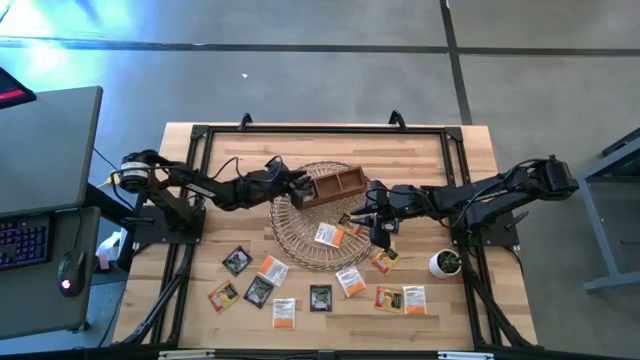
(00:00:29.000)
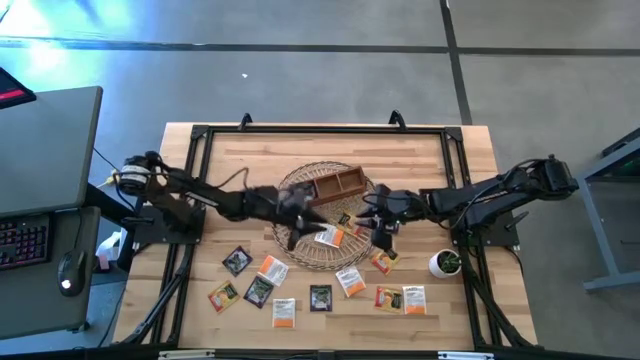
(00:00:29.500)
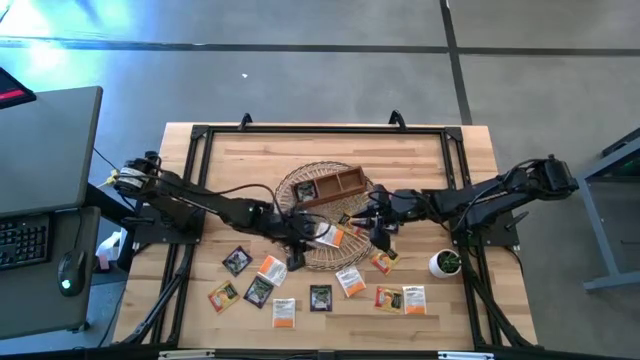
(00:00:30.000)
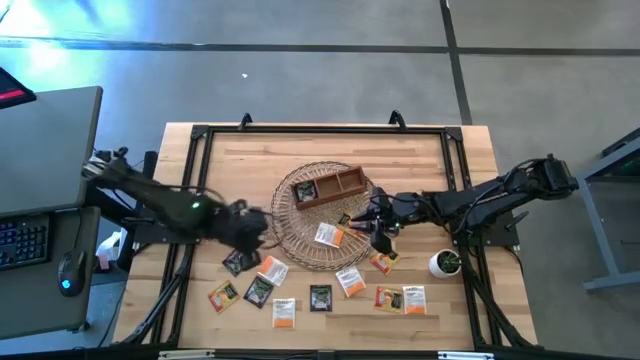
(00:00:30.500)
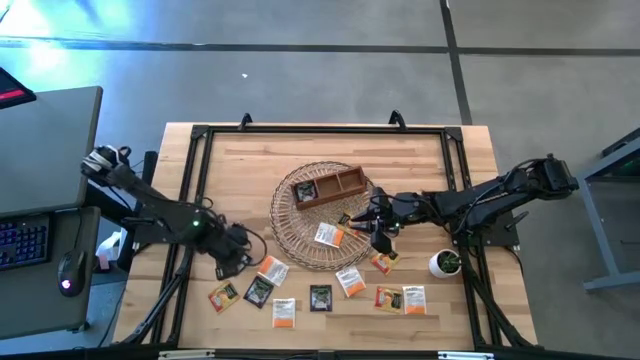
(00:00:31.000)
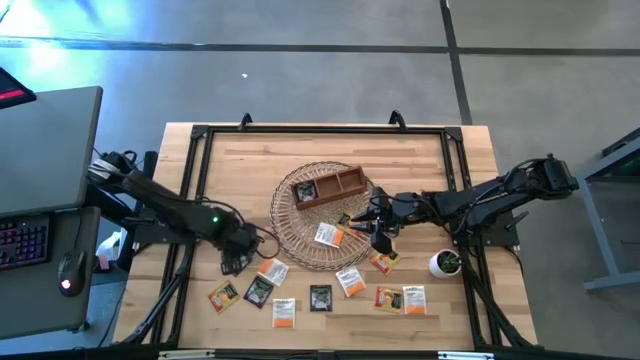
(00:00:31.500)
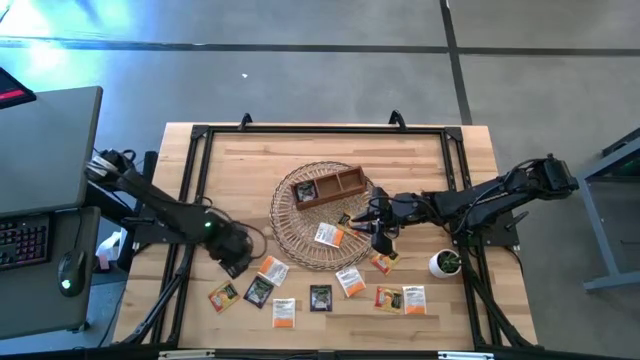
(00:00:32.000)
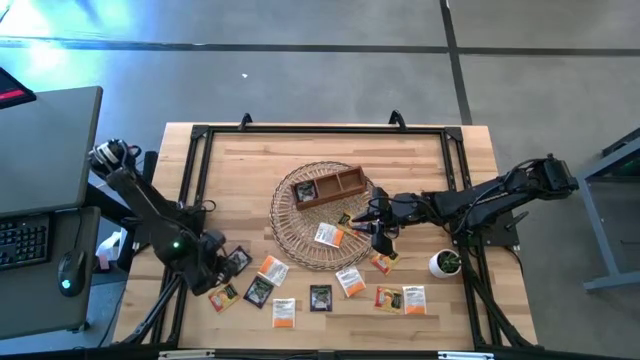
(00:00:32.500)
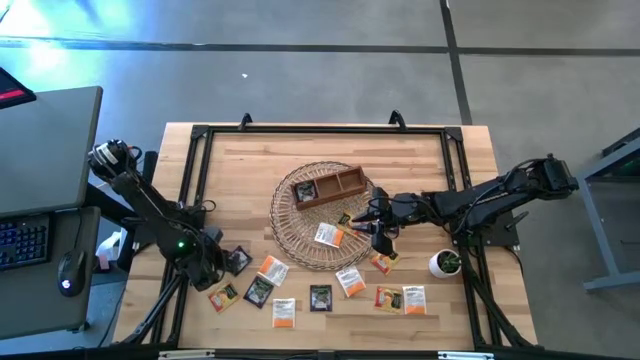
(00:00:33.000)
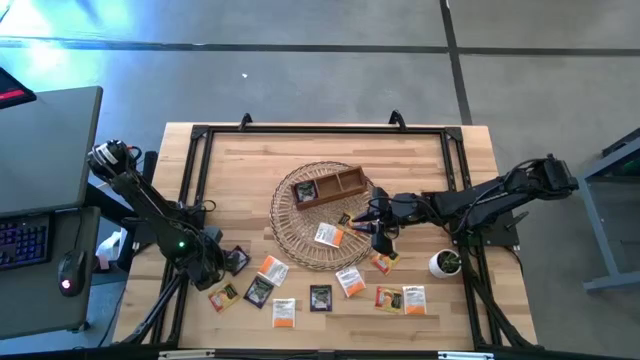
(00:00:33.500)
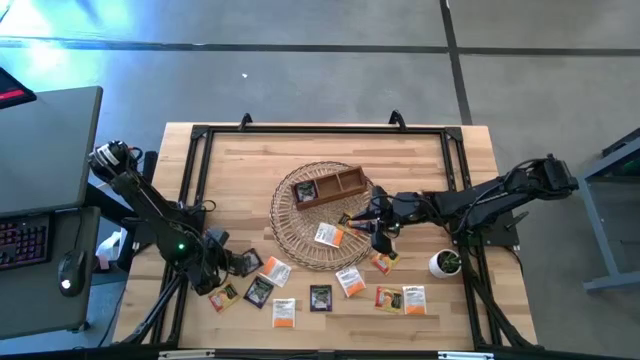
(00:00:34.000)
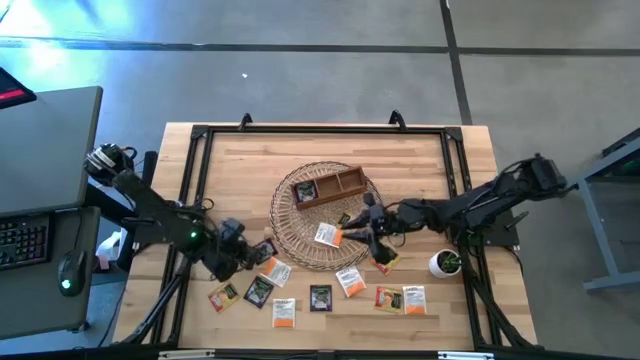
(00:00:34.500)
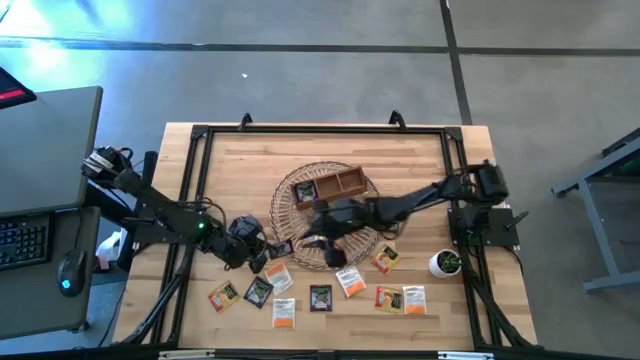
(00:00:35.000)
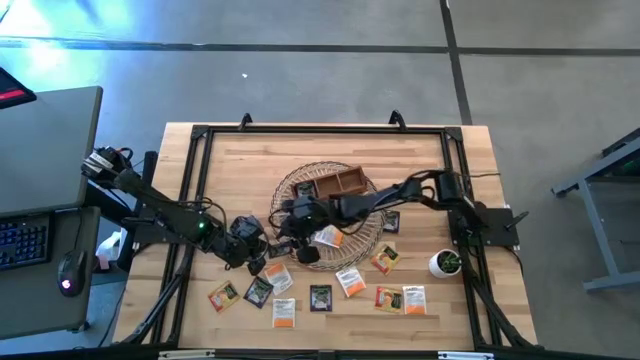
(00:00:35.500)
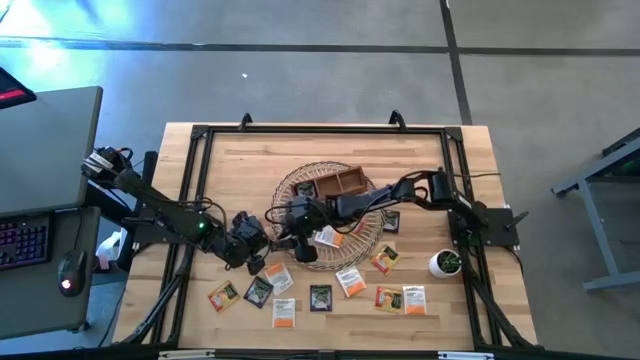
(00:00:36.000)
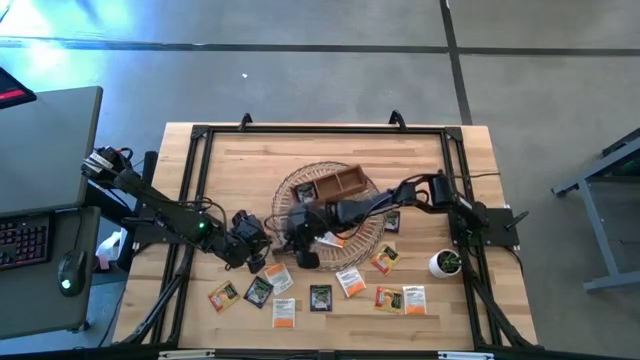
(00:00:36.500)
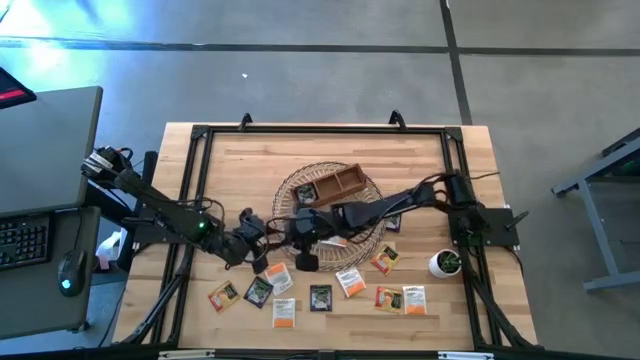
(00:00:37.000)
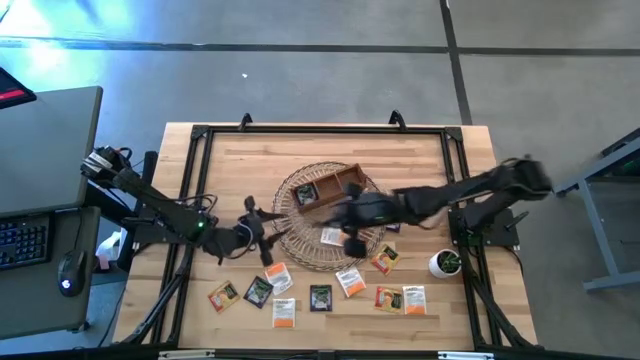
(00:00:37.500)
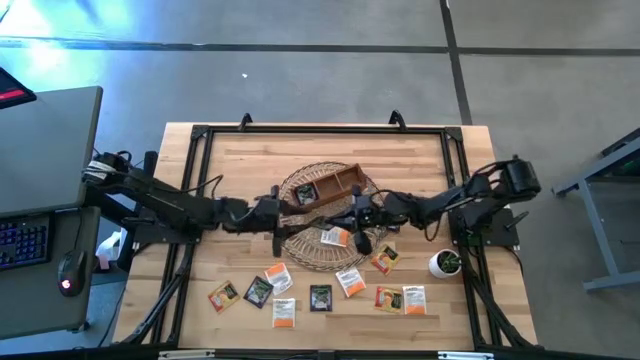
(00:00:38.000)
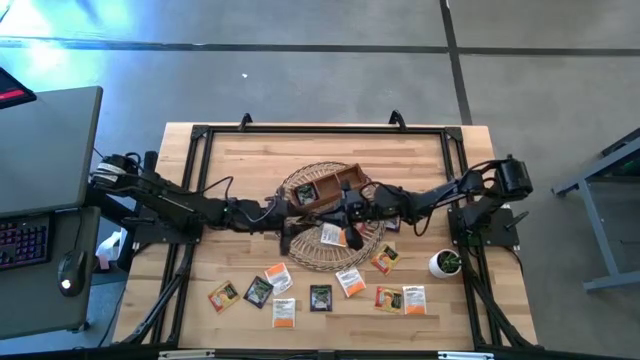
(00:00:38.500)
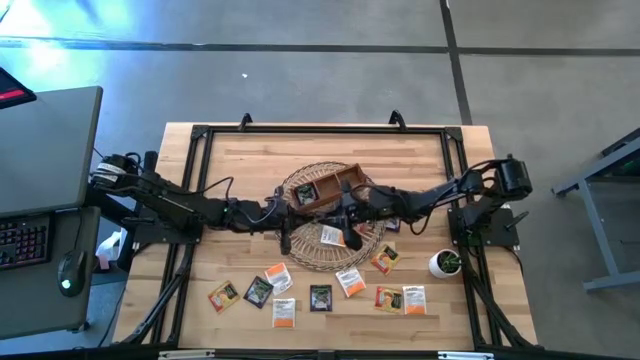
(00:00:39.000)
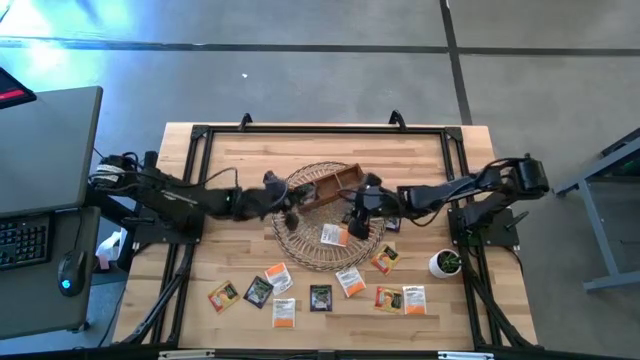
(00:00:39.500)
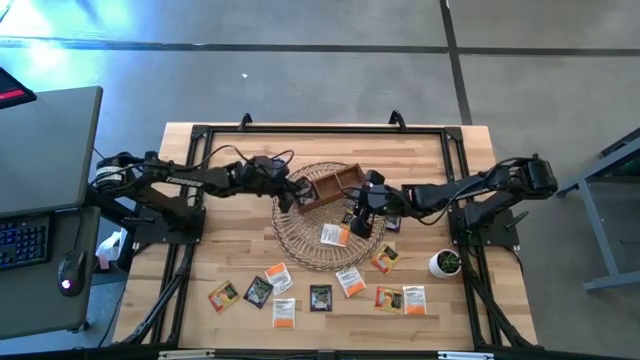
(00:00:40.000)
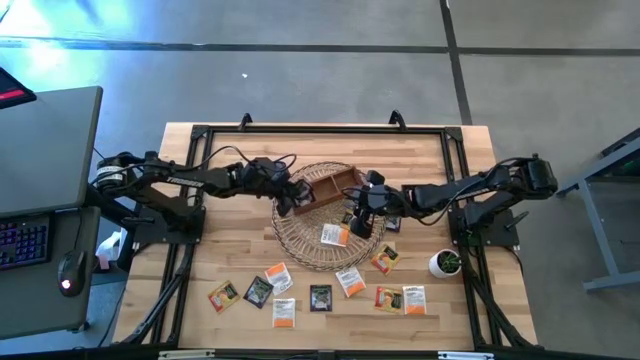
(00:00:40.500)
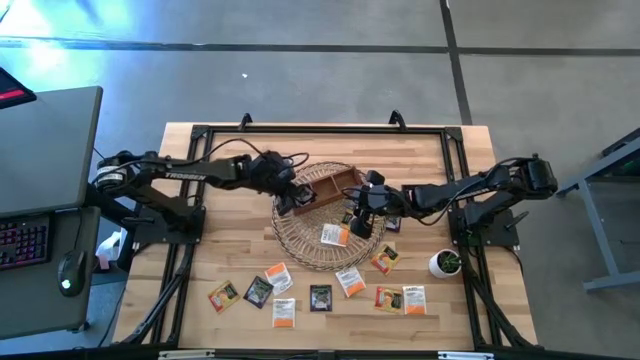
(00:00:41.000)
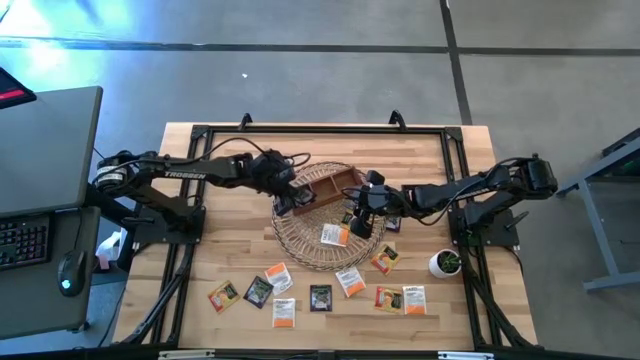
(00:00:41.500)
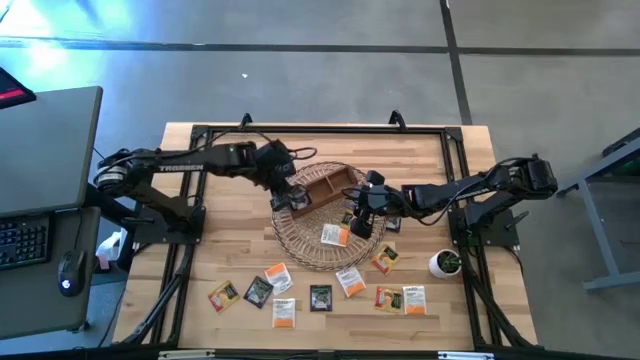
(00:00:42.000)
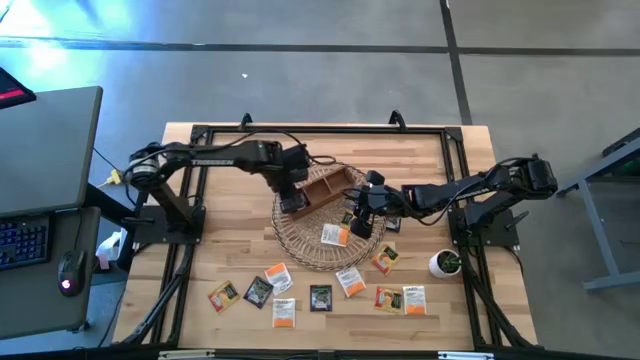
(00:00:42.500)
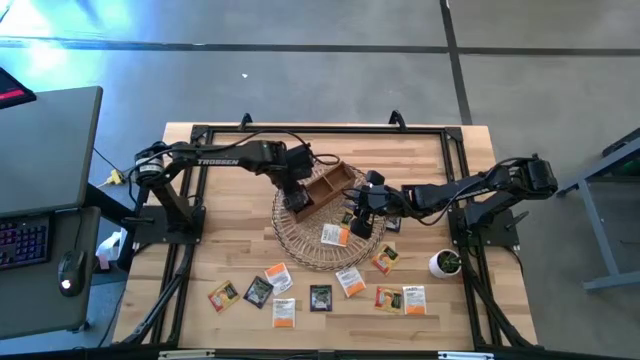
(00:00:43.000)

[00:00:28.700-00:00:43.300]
Task: Pick & Place Tea
Put the violet tea bag into the left section of the brown wooden organizer

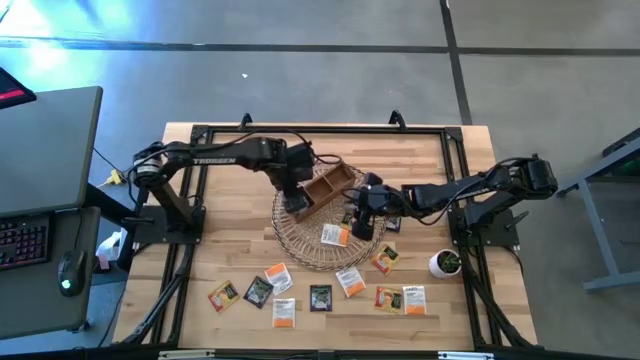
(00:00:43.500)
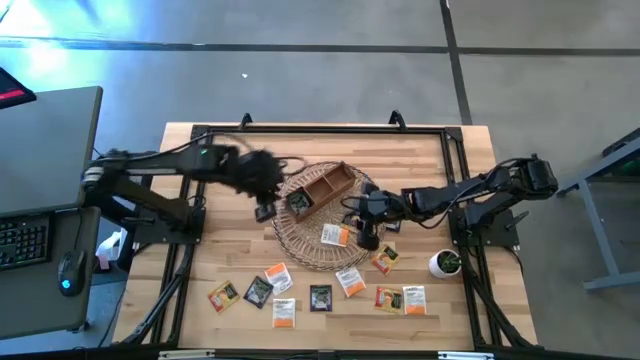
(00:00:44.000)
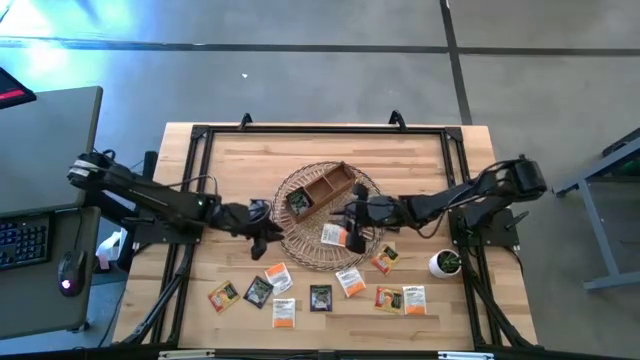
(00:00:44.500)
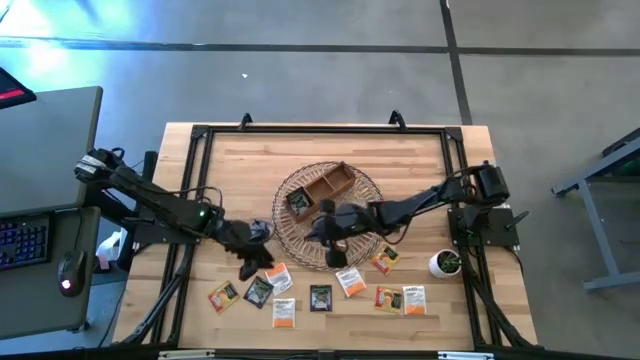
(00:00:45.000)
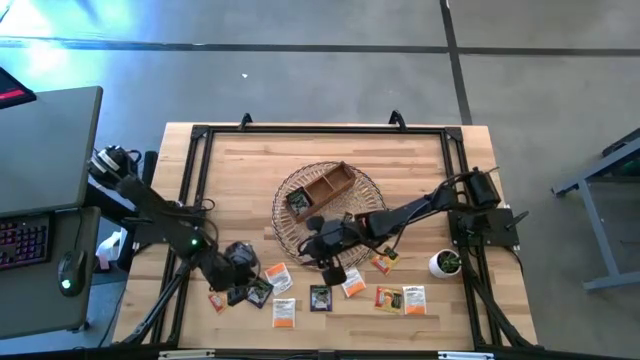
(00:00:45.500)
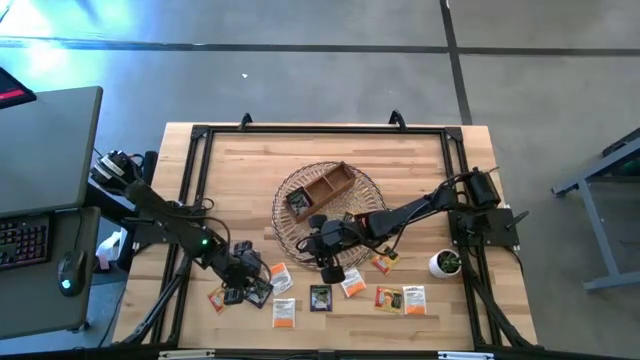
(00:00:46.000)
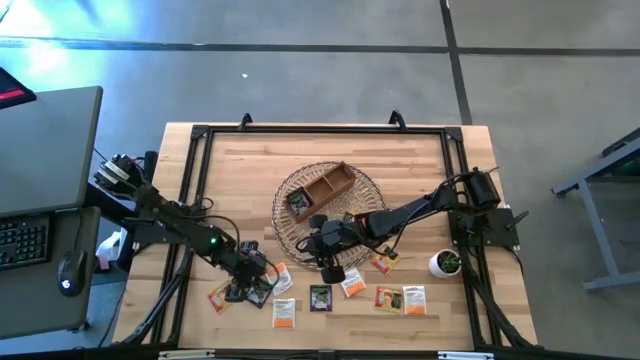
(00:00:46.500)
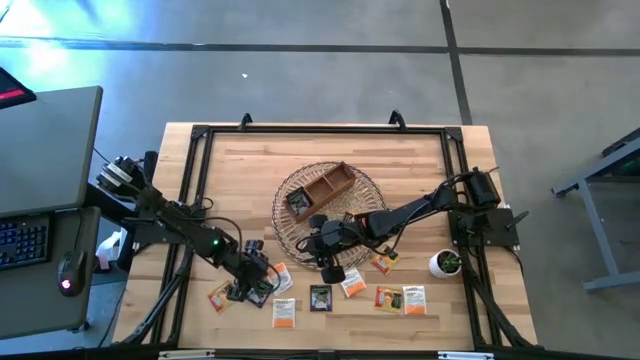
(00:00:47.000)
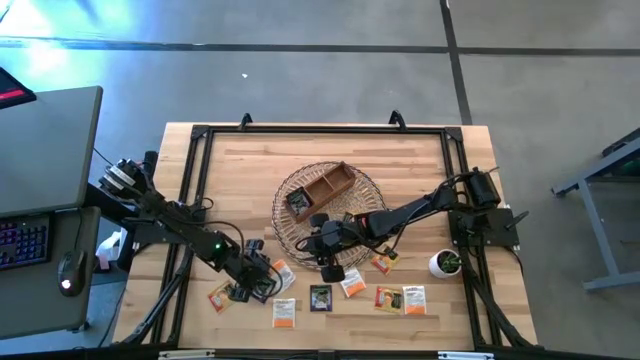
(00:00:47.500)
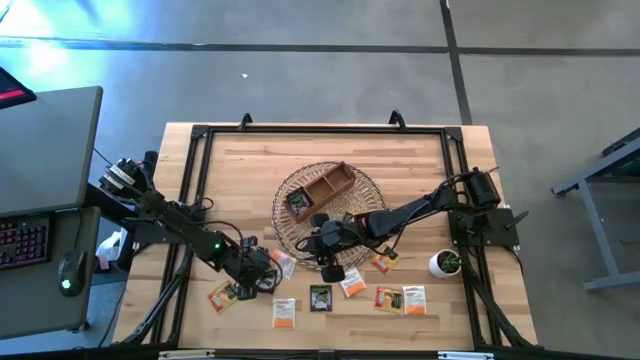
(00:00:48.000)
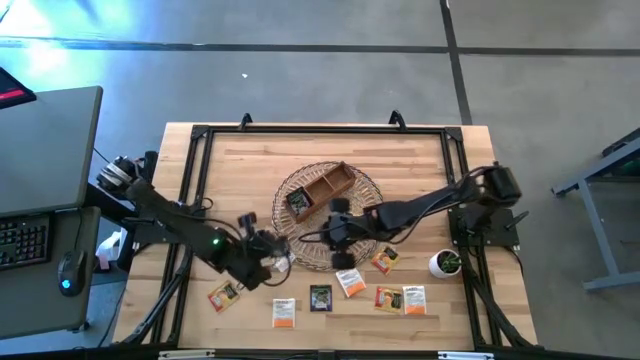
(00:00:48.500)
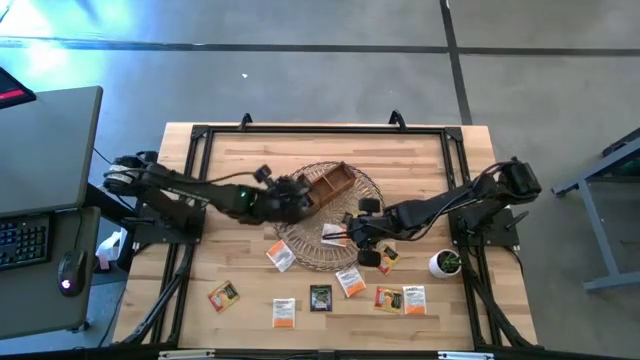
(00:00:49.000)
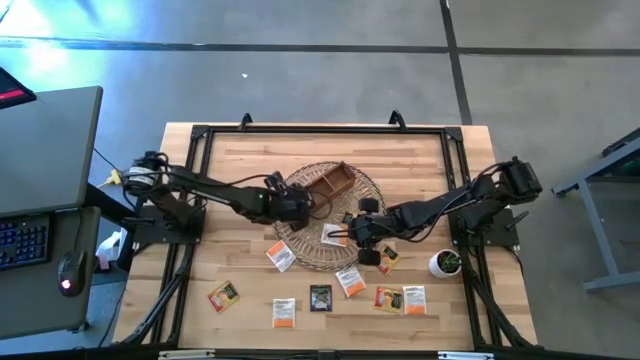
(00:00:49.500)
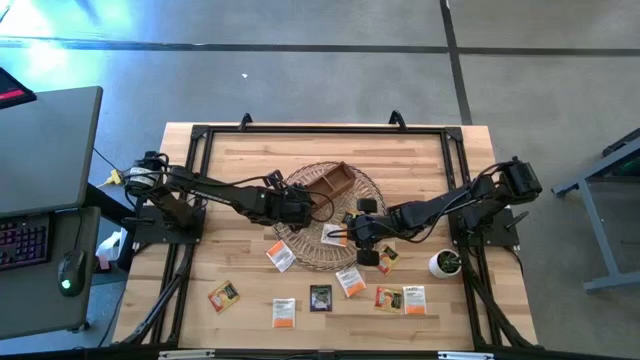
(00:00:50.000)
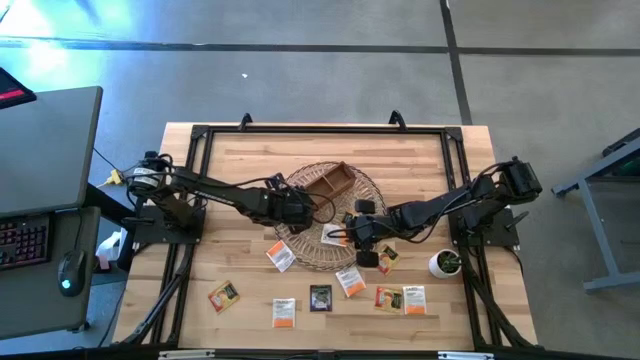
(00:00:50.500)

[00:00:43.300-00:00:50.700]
Put the violet tea bag into the left section of the brown wooden organizer
